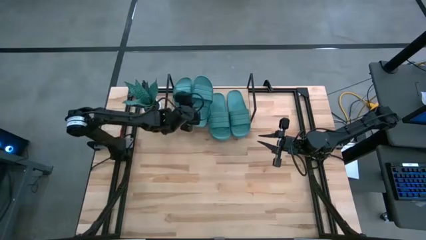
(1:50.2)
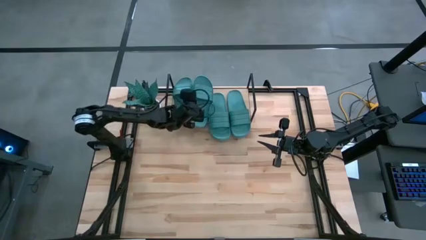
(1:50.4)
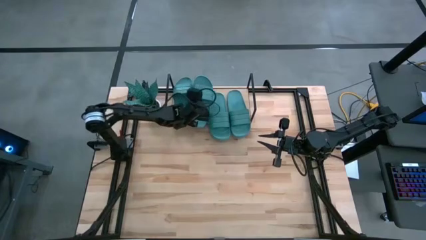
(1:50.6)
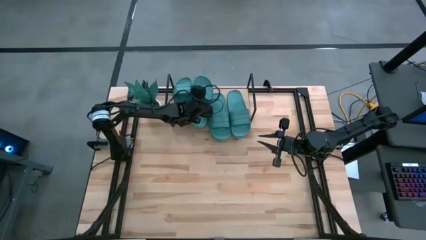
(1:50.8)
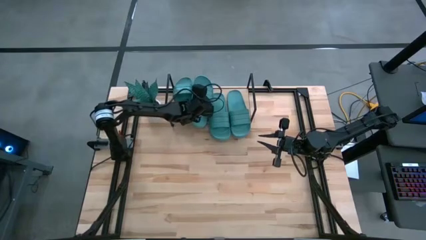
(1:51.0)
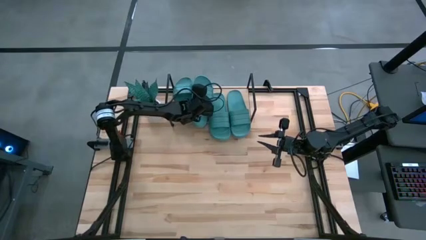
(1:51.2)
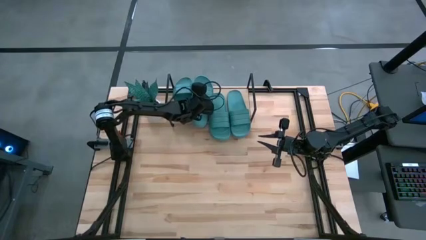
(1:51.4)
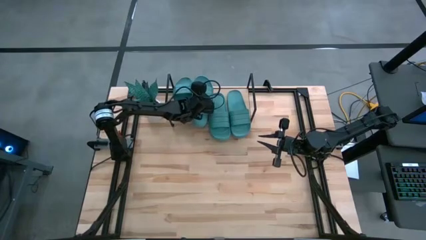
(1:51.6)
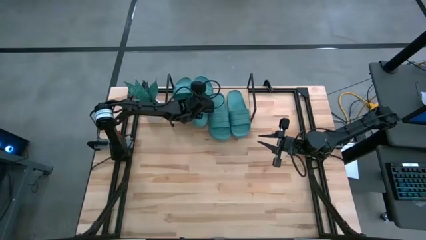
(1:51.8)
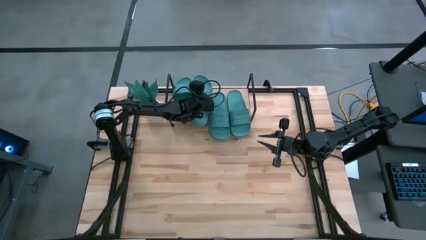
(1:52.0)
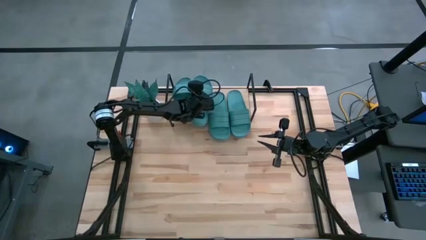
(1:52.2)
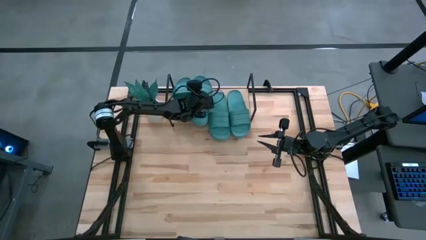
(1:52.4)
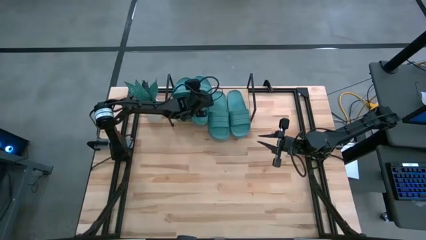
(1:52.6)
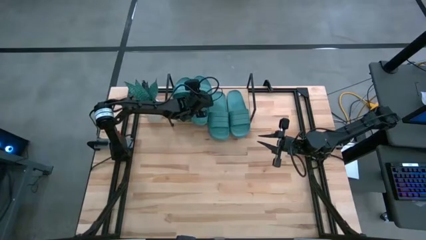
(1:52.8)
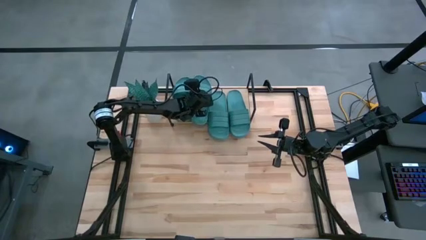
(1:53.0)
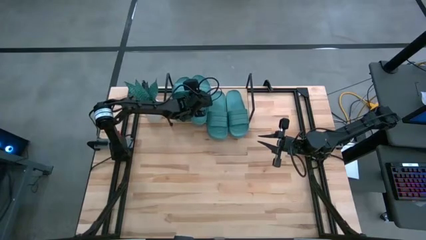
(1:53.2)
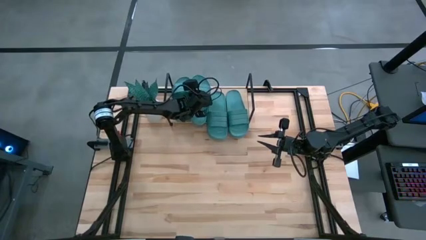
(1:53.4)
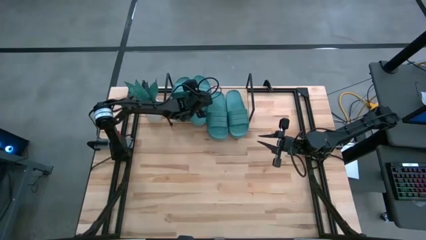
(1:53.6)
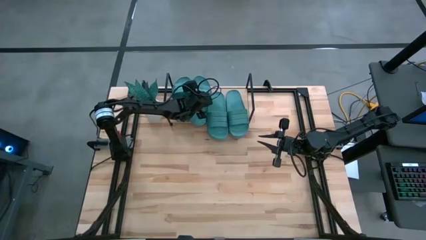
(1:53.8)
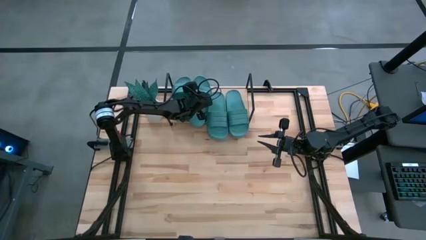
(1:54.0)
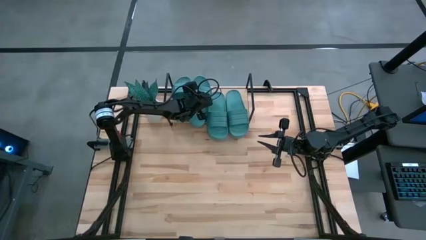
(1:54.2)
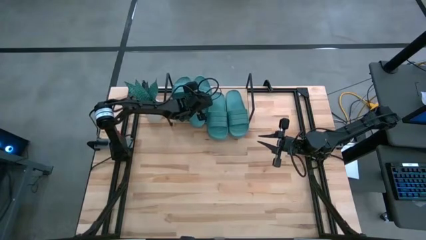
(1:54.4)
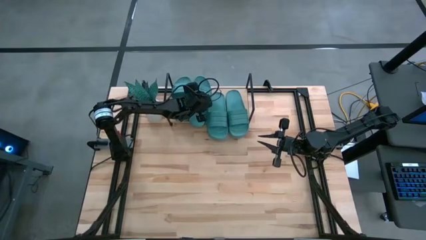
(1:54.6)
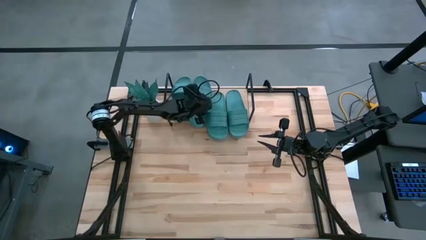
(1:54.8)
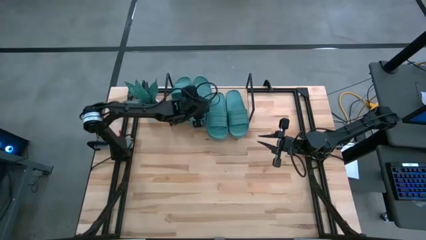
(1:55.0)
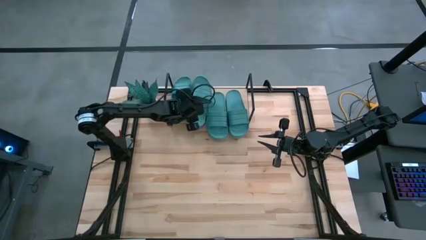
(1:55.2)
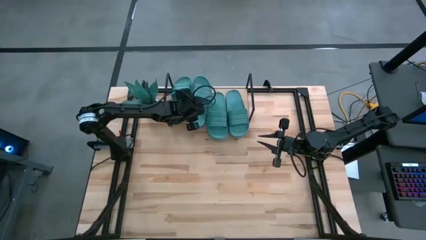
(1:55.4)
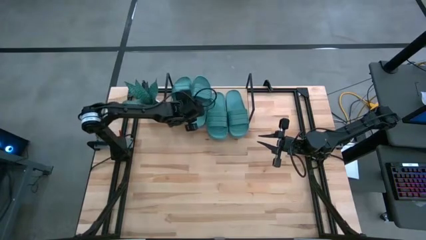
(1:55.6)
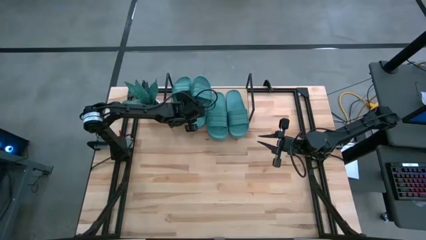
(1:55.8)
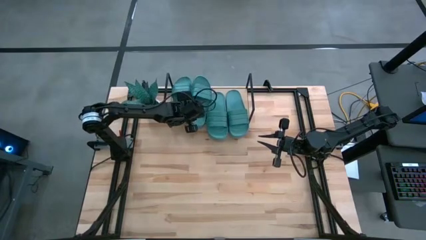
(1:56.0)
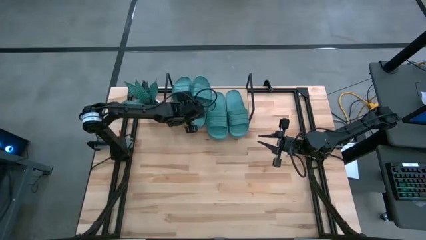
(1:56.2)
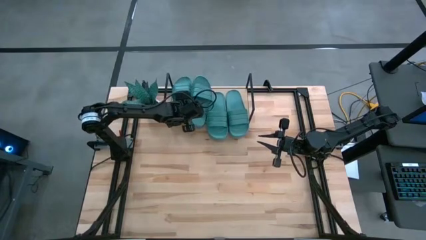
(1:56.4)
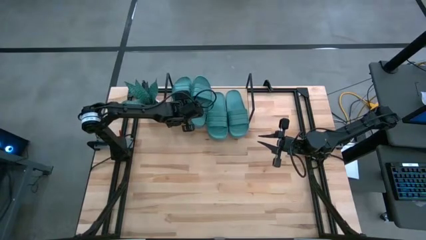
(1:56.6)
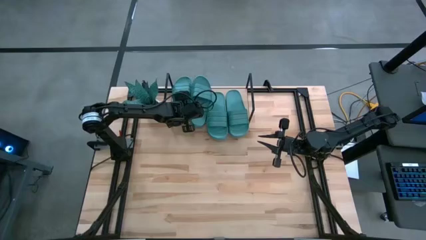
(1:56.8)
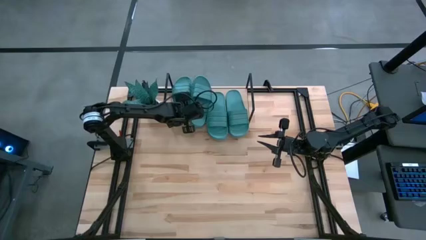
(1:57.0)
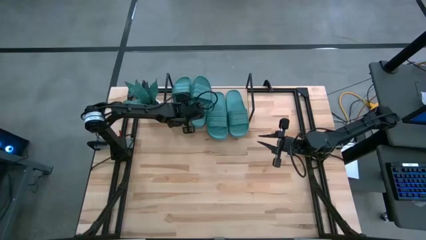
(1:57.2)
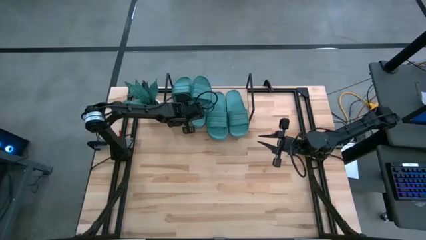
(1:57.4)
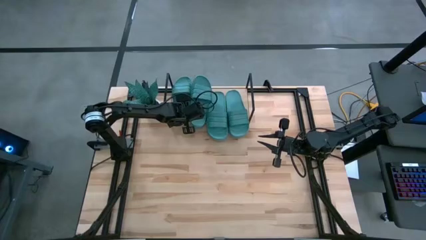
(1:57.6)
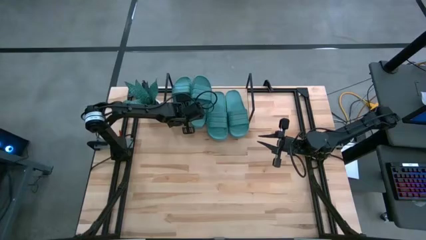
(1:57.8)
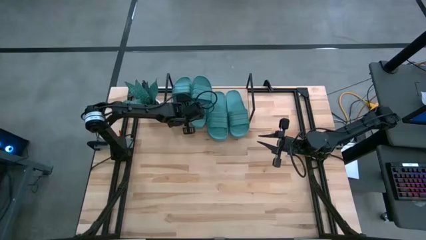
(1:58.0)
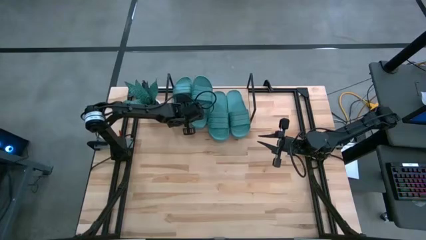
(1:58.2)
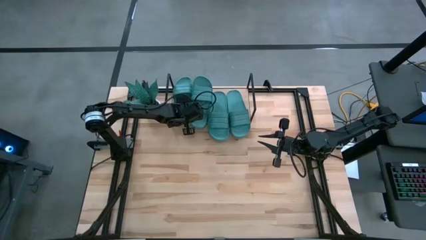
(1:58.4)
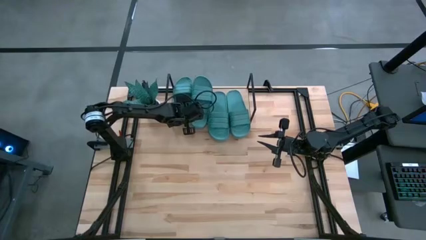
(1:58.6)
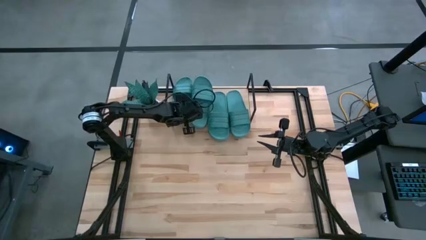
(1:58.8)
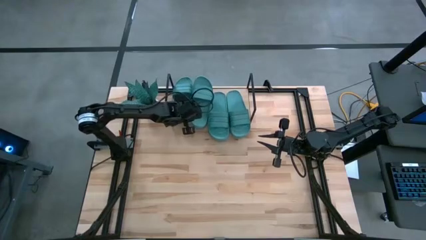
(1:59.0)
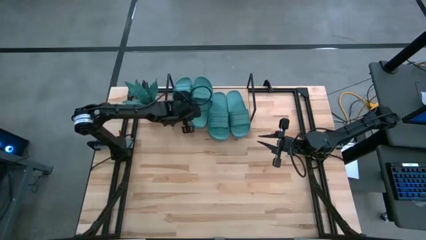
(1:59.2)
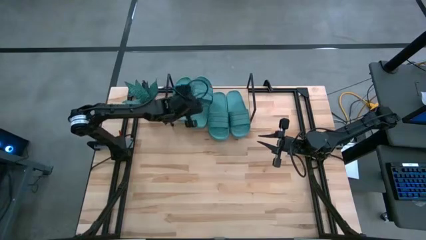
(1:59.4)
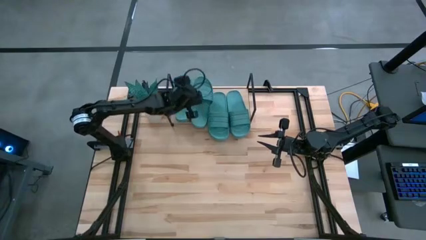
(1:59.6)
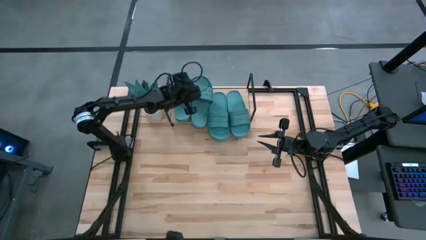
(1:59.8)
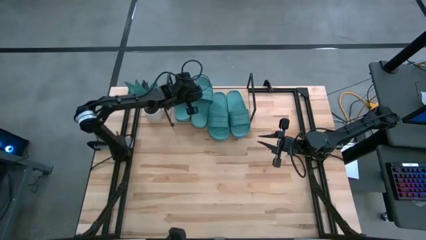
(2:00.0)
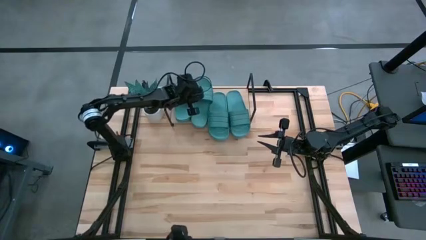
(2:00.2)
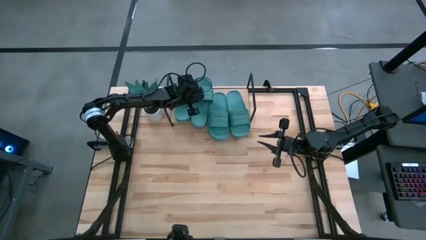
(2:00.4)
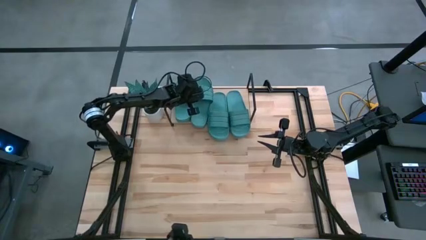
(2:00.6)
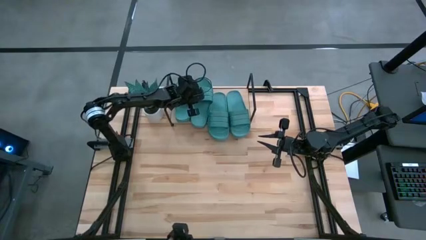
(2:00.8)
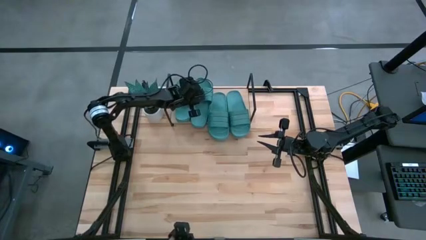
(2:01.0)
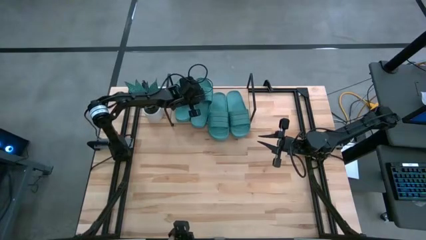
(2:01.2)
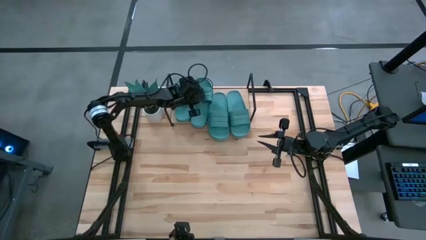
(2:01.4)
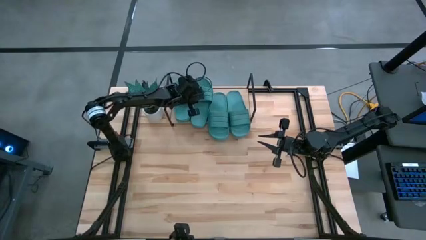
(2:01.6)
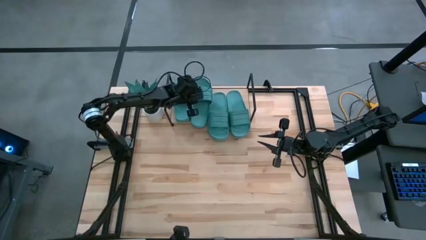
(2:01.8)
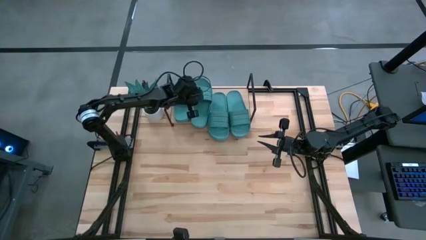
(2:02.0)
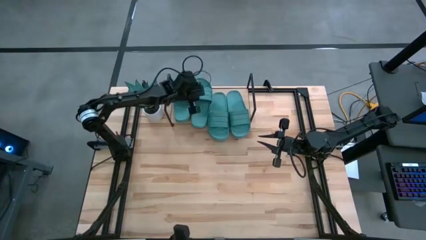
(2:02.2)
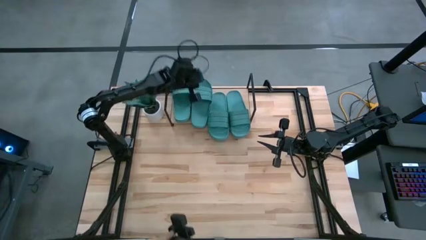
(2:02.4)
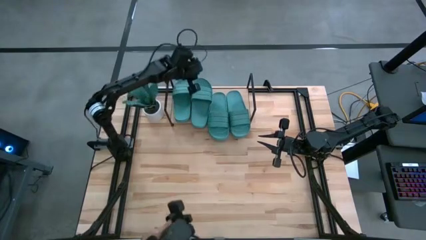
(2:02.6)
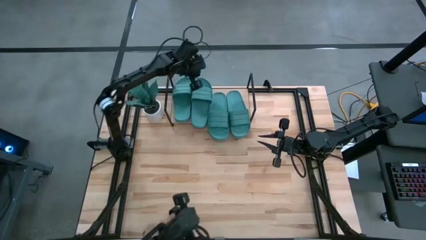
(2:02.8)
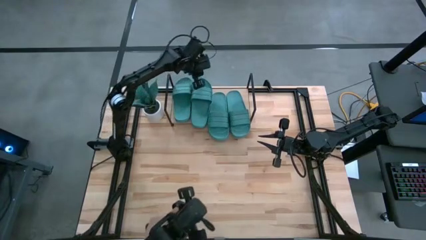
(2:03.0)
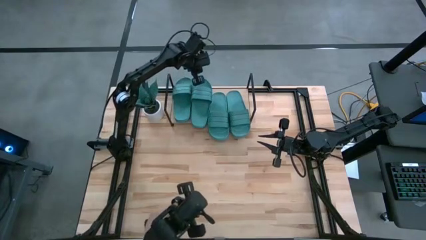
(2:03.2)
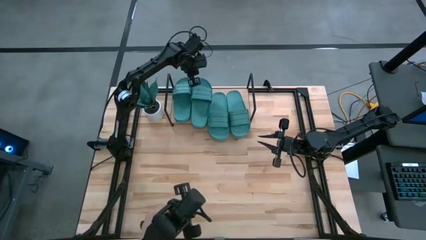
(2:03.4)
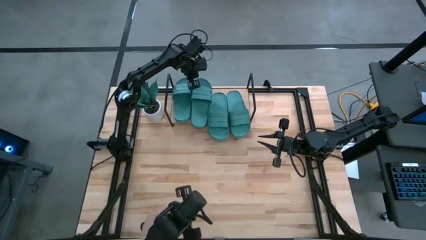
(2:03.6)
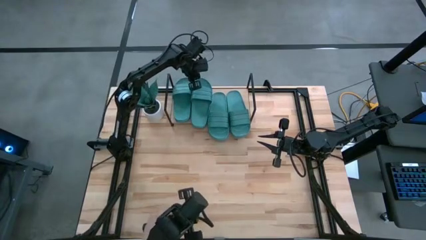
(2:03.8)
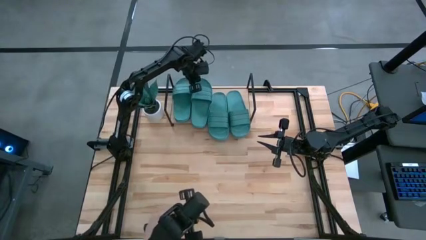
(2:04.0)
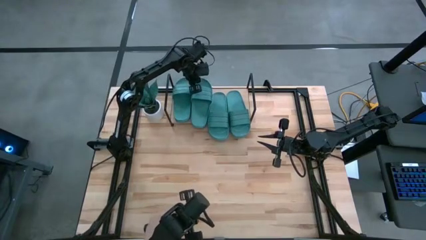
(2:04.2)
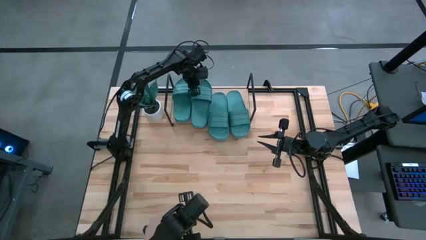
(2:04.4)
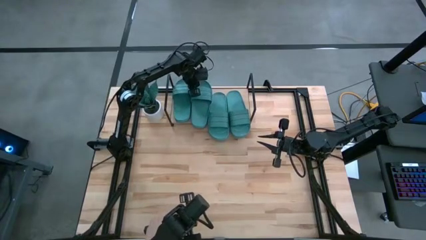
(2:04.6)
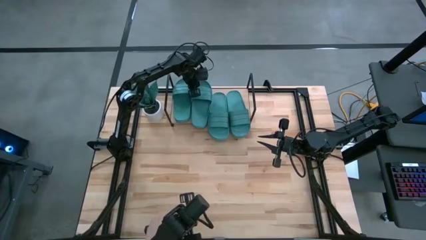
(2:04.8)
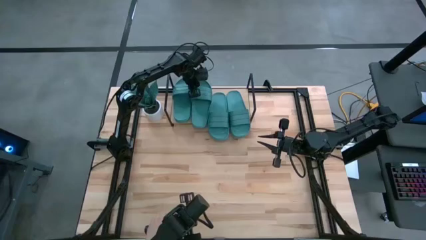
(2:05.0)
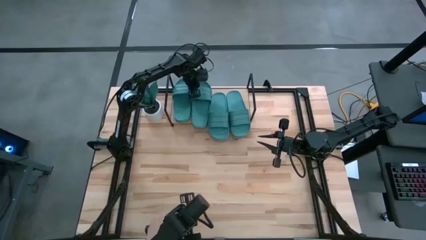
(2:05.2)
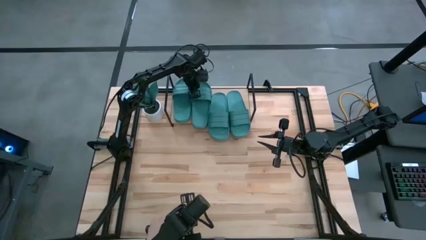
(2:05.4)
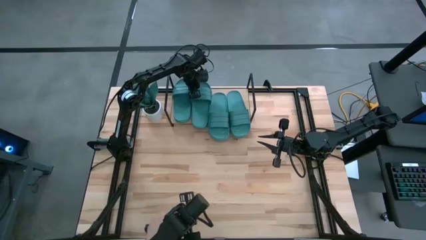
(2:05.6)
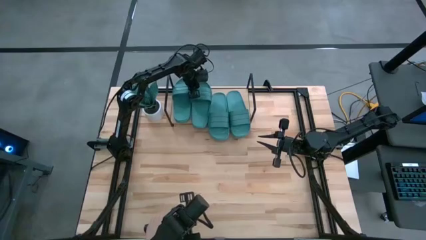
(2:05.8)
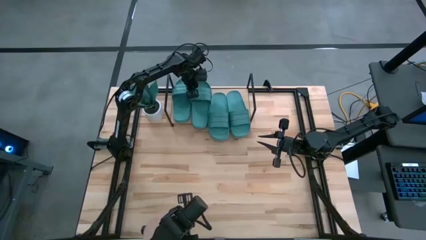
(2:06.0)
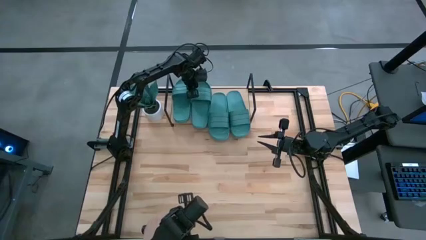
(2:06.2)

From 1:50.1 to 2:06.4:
Task: Pick and place slides into the shelf
Put the green slipper on the shelf
